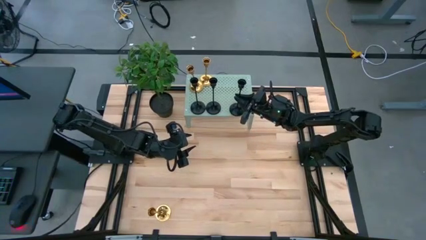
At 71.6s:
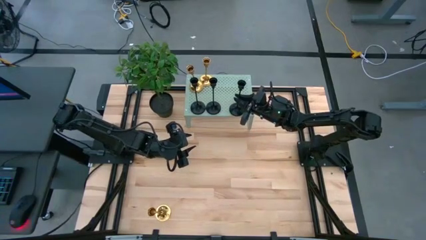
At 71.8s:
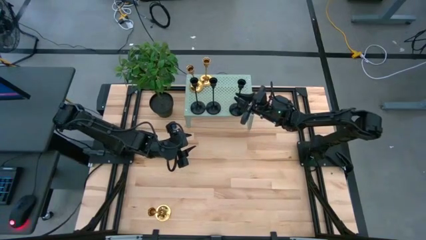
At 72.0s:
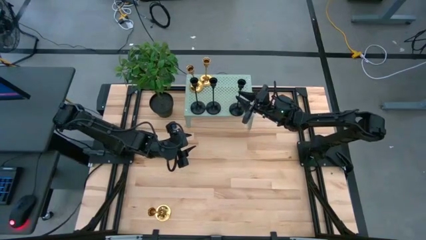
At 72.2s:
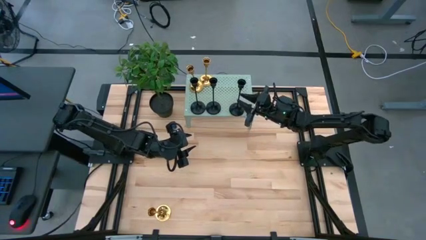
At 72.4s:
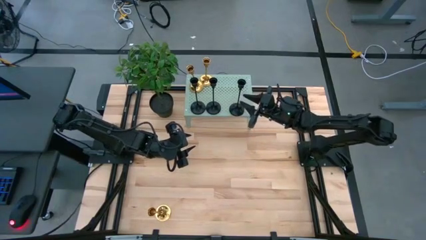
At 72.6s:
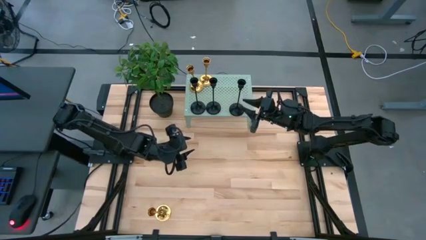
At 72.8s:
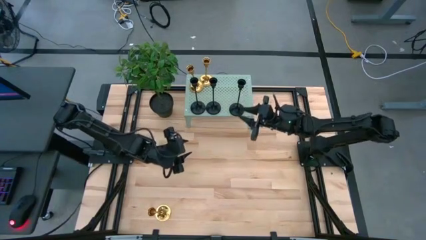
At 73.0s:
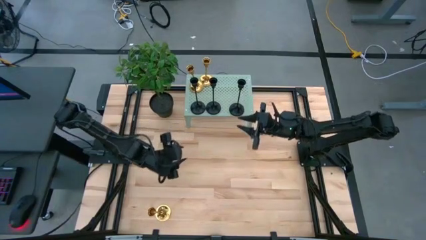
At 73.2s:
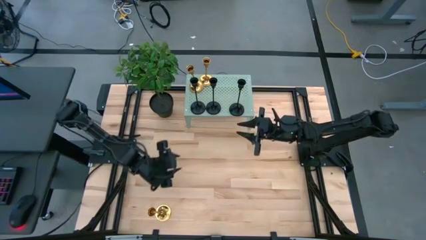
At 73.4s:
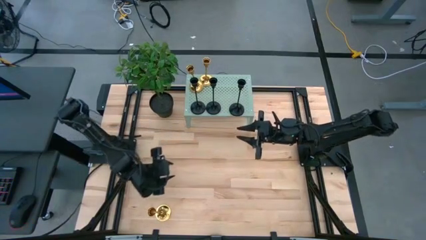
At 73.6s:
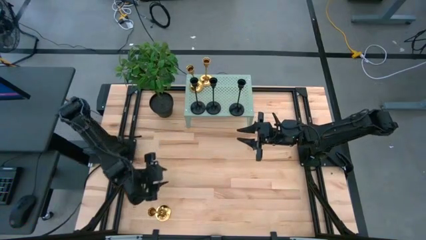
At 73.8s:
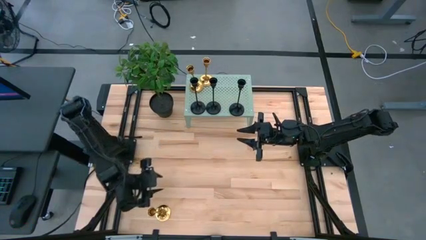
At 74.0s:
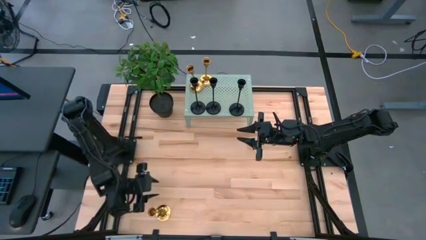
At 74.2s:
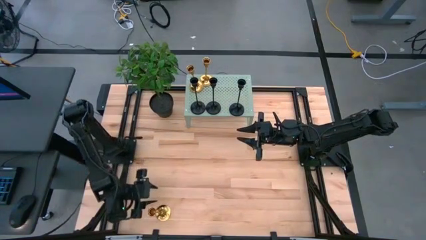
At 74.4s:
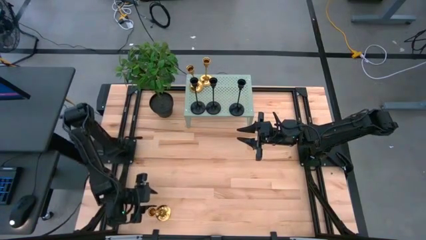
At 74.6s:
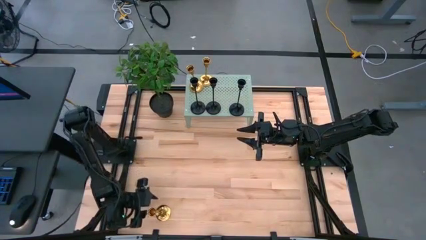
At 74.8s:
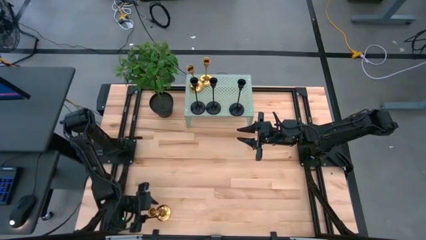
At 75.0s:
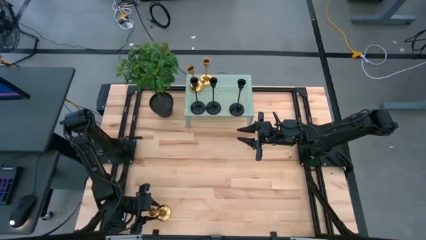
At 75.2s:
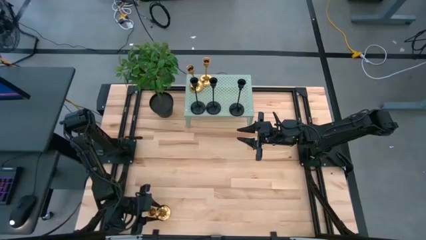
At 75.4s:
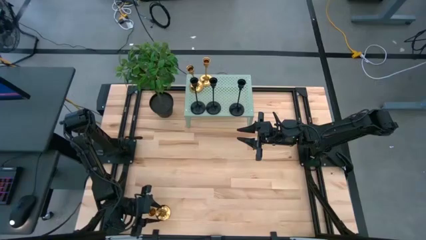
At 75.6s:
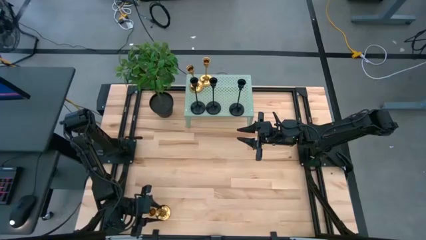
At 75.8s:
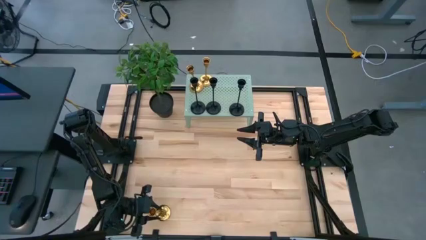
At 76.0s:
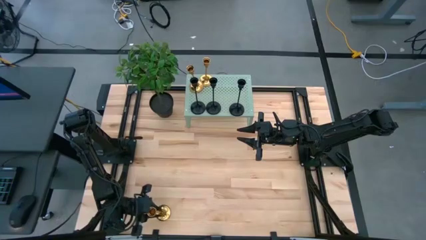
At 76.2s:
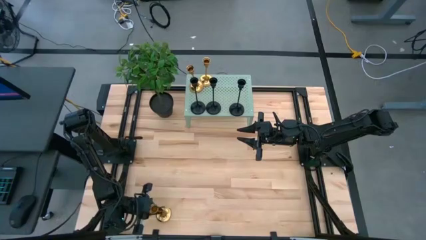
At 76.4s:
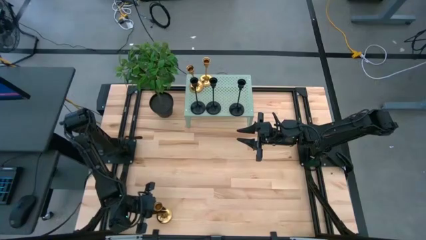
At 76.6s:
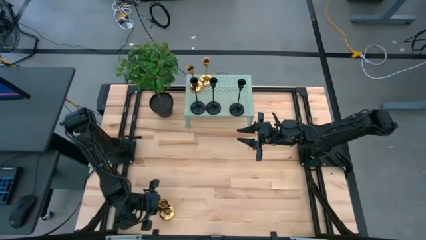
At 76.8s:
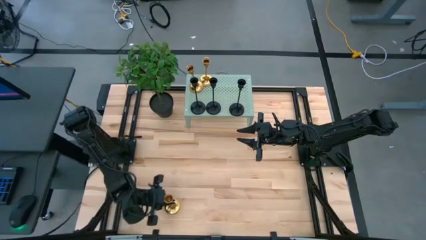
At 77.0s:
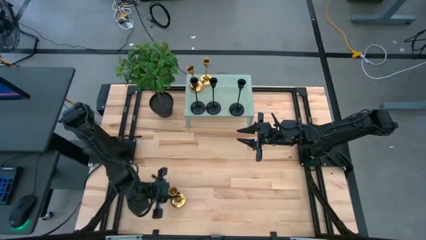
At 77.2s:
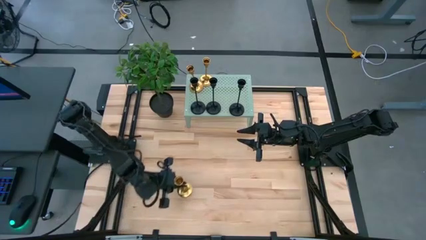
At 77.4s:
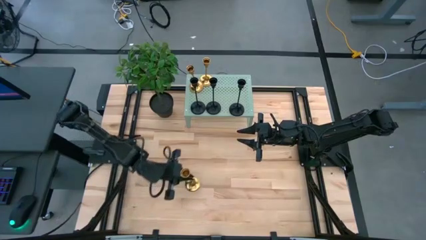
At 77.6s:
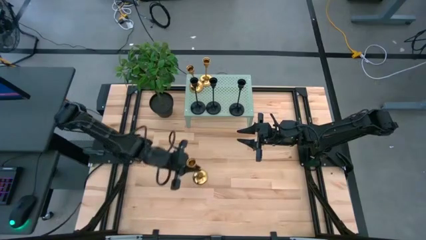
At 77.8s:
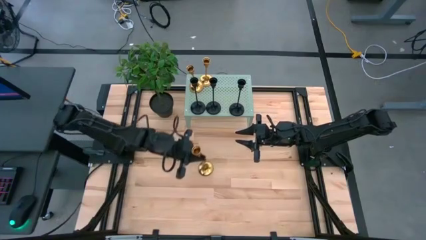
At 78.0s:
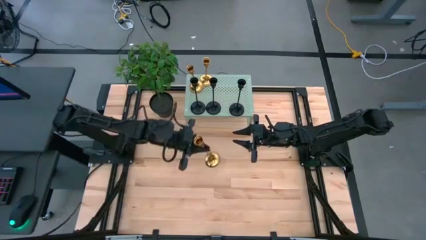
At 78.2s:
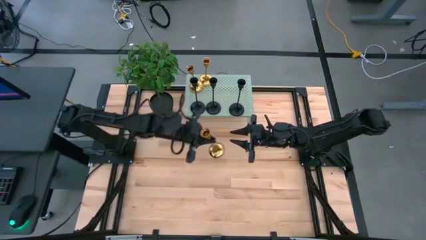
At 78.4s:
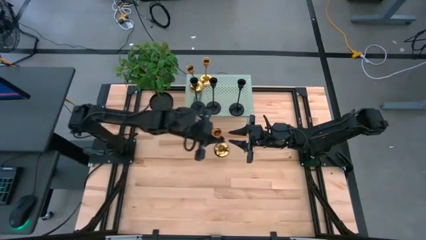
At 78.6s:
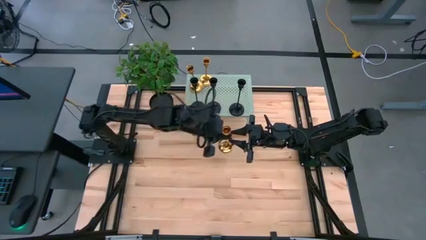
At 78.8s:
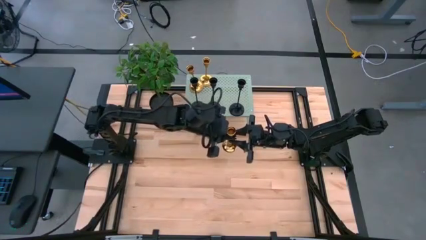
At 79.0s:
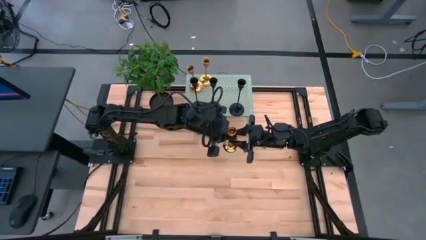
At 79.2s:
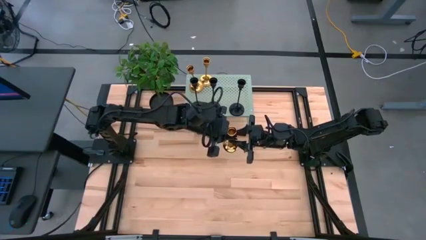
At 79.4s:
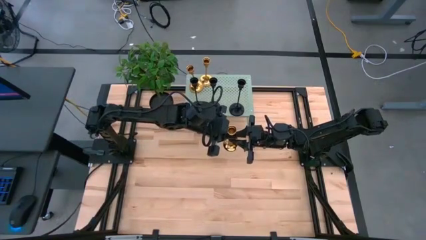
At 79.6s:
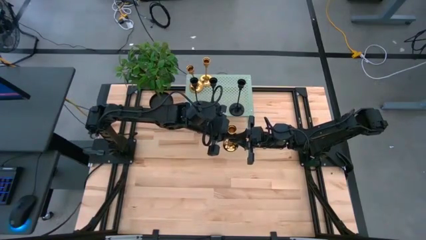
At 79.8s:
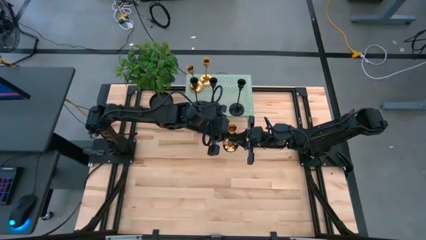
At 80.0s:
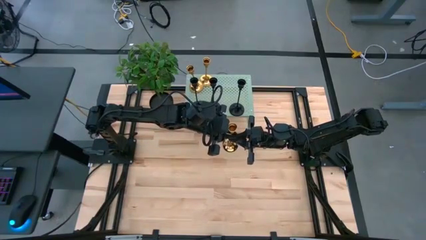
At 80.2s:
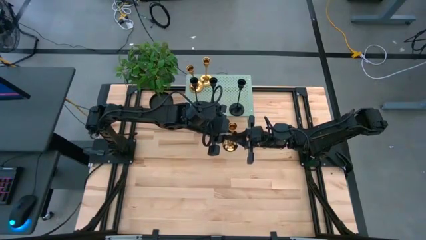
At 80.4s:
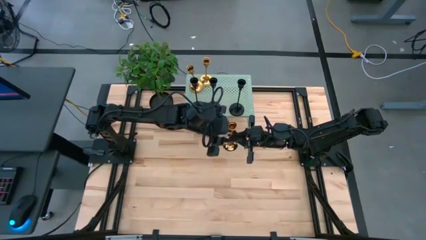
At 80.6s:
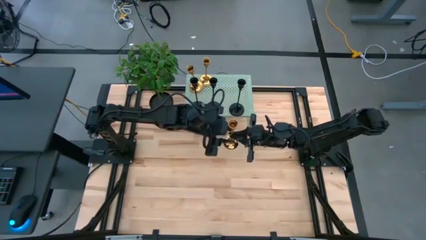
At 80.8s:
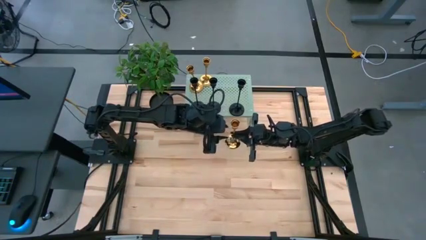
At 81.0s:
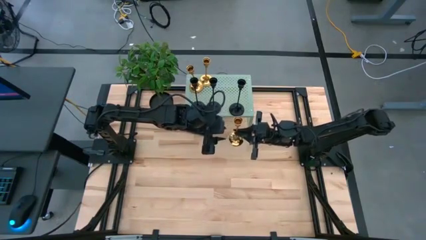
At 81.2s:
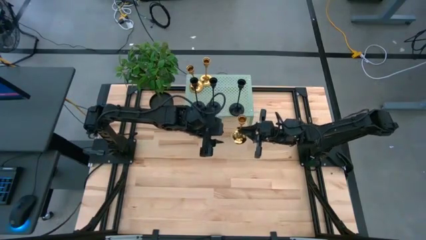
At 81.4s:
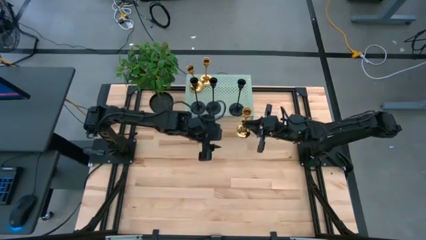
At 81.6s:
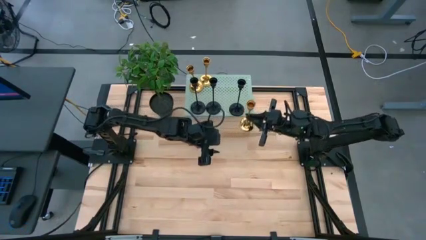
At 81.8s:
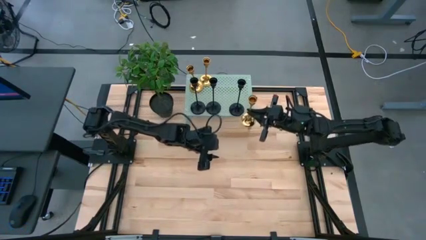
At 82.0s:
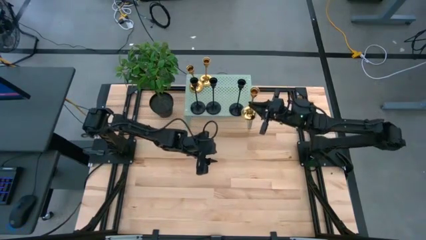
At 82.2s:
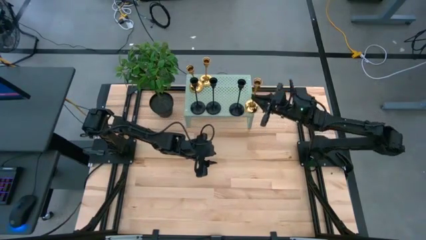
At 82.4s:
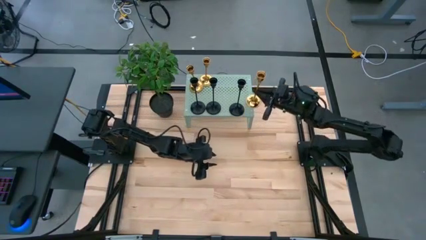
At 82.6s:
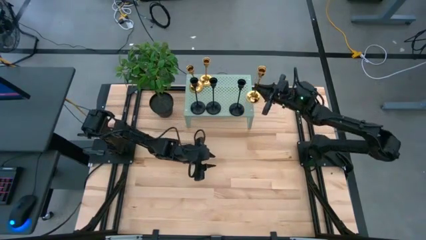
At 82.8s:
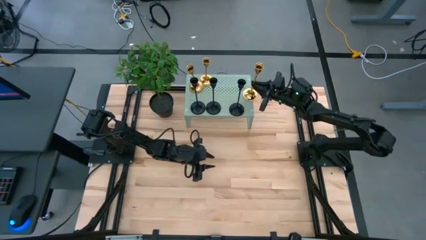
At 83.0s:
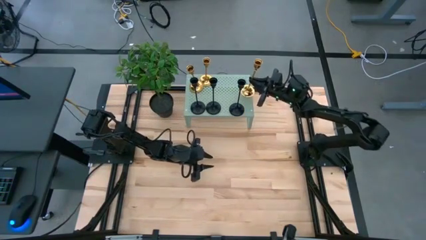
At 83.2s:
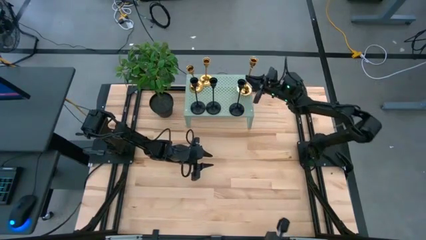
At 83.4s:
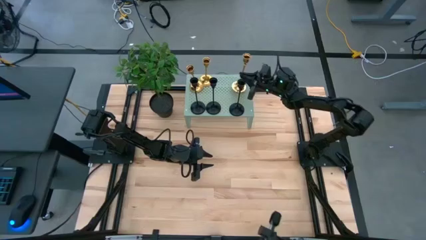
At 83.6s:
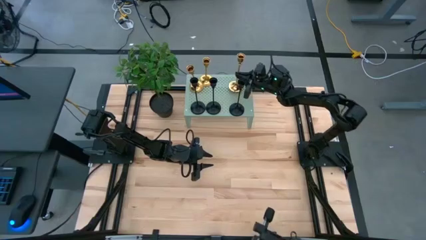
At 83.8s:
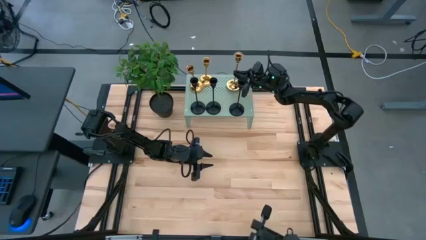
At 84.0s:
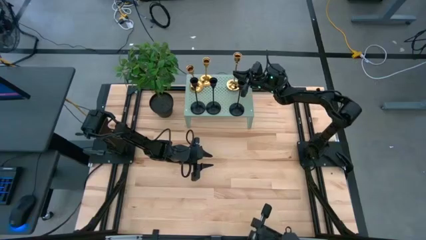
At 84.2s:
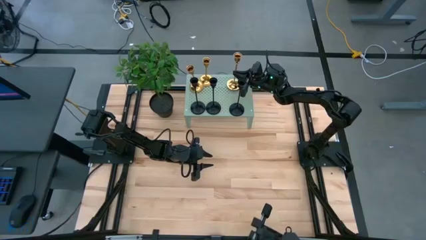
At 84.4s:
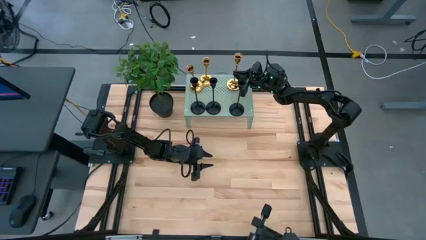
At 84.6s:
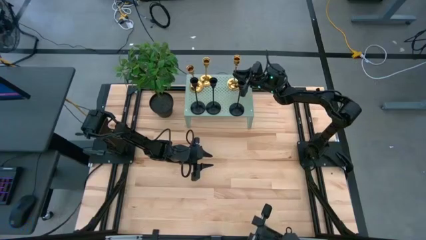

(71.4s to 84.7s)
Task: Pick & Place candle stick holders
Put the gold candle holder on the shelf

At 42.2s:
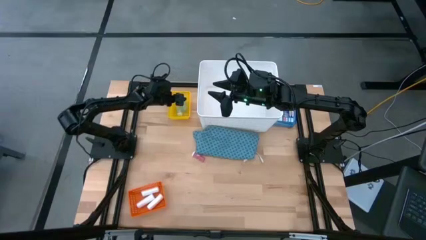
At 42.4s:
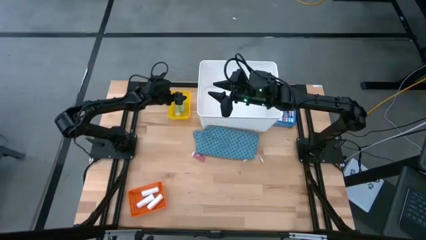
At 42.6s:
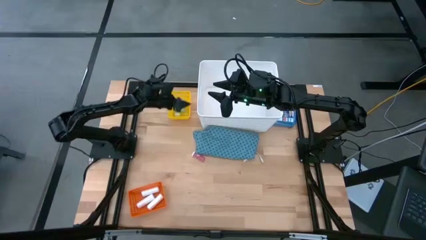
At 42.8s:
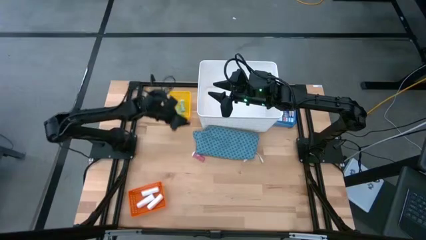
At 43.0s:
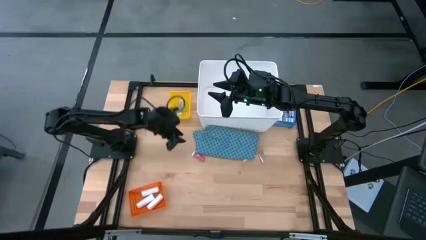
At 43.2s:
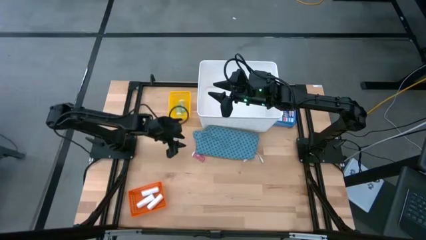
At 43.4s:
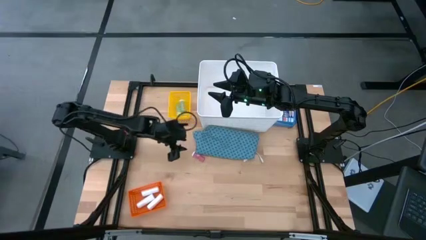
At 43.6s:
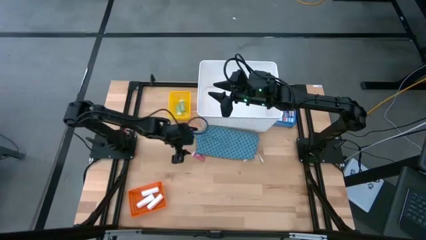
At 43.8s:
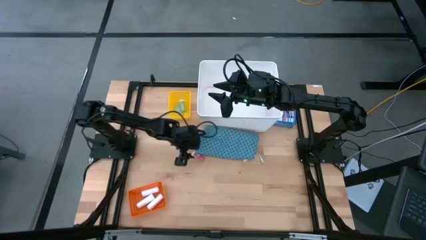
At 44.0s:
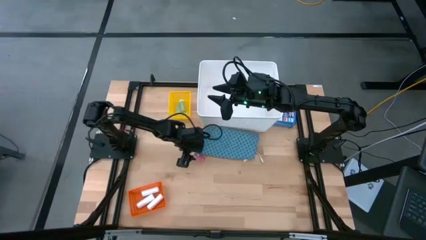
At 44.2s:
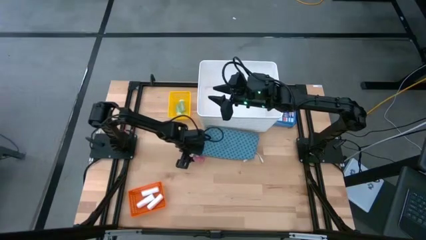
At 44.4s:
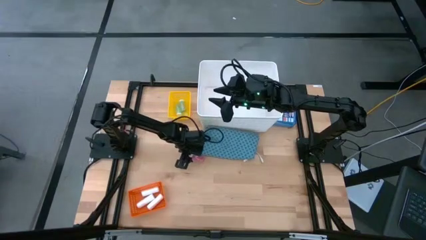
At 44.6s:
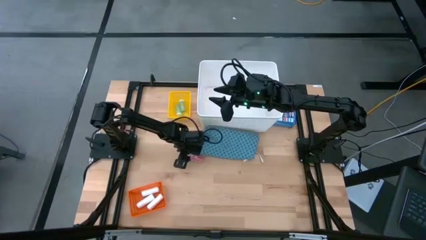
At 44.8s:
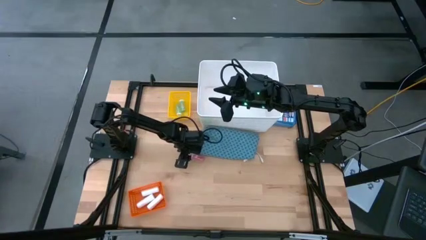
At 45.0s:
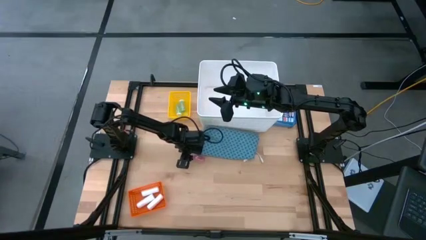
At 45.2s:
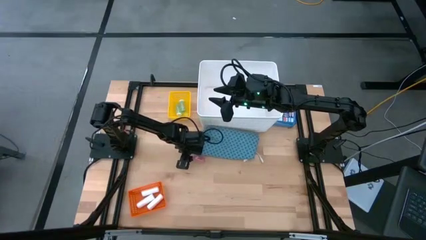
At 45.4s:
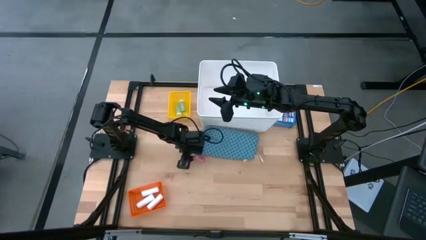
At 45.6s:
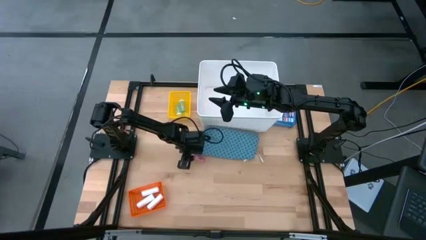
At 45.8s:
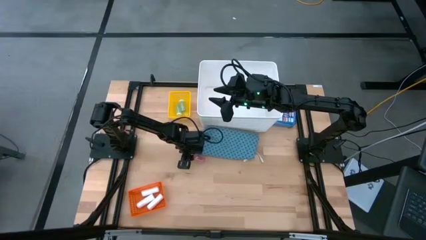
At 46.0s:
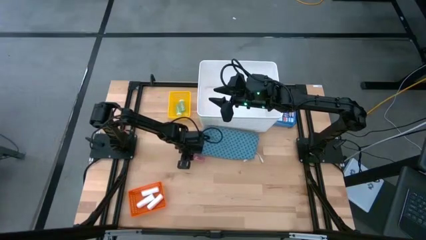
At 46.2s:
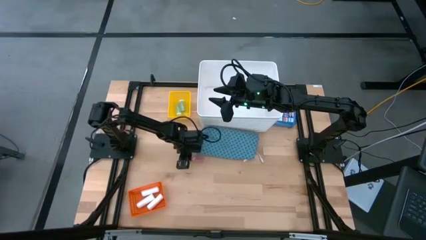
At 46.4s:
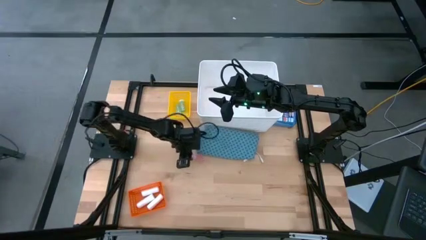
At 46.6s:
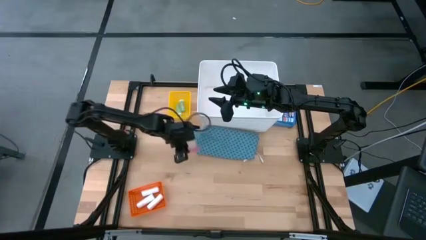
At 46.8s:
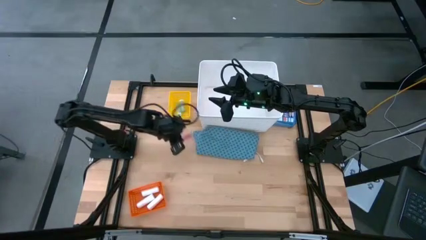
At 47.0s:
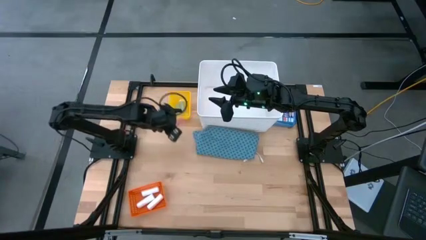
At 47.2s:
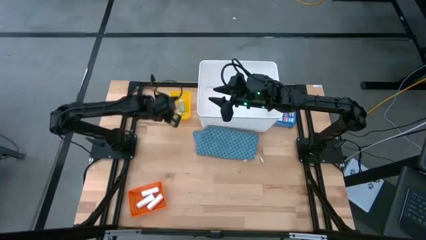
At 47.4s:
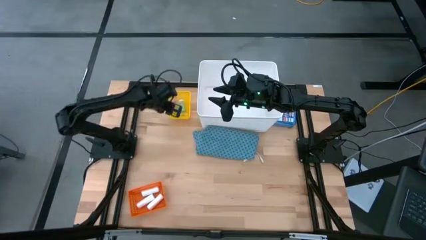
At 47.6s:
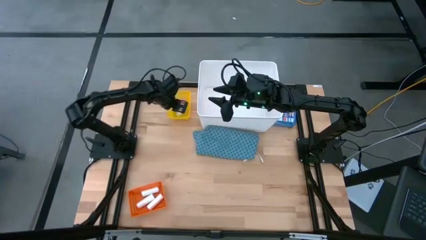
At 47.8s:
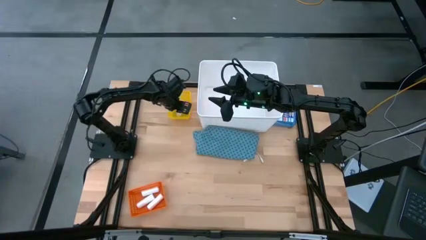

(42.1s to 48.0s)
Task: Pick & place medical supplies in basket/bin
Put the pink bottle into the yellow bin
